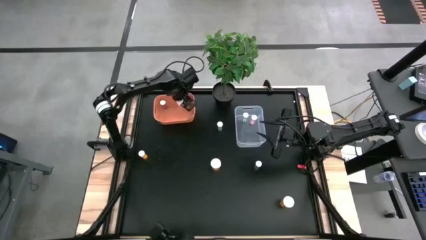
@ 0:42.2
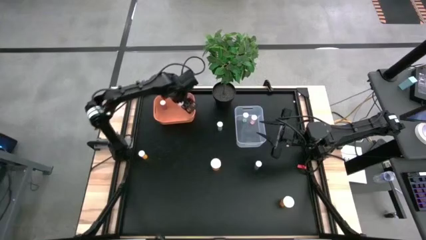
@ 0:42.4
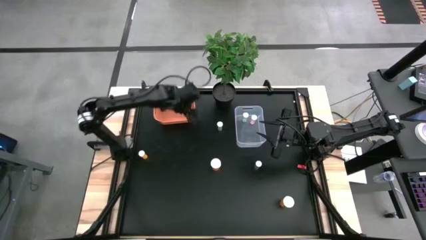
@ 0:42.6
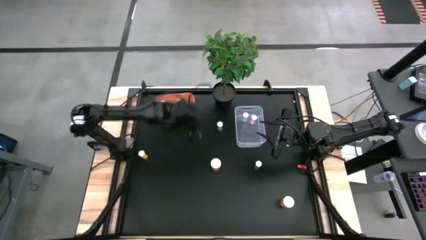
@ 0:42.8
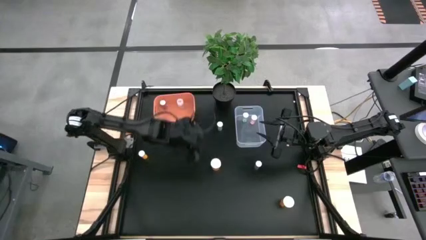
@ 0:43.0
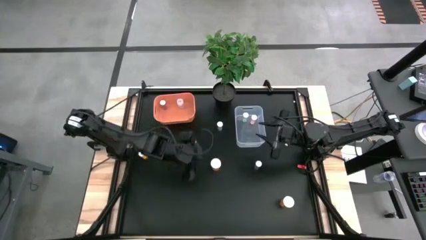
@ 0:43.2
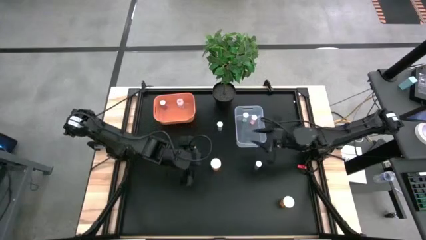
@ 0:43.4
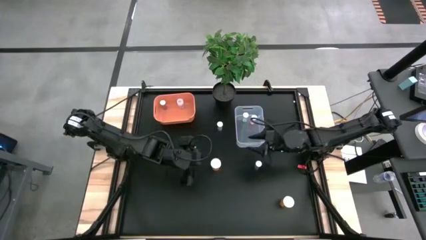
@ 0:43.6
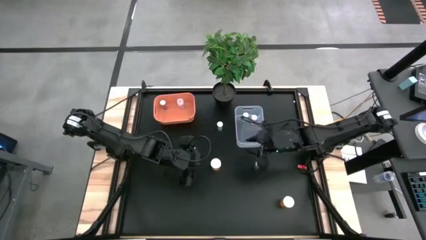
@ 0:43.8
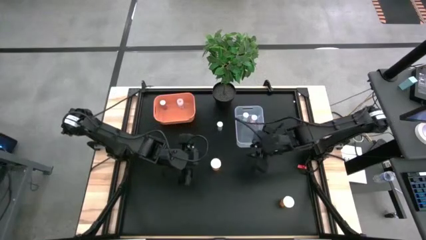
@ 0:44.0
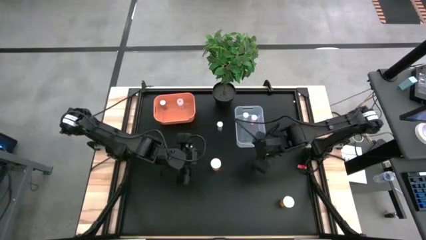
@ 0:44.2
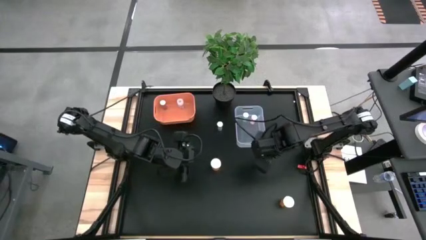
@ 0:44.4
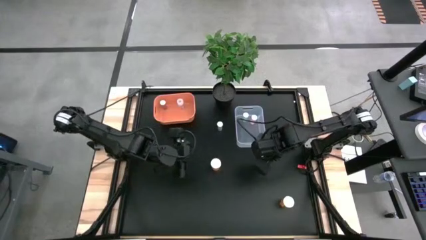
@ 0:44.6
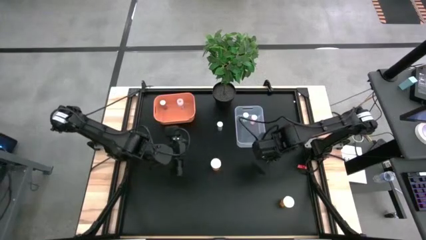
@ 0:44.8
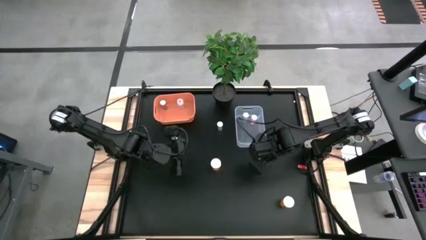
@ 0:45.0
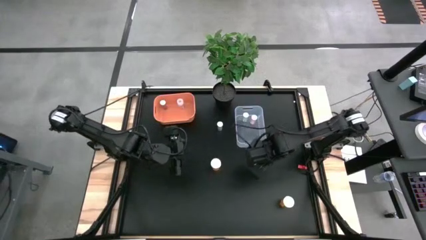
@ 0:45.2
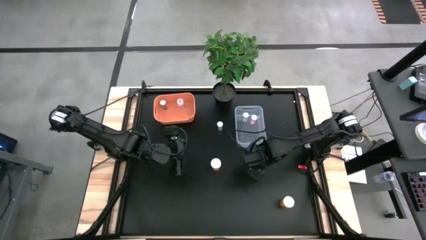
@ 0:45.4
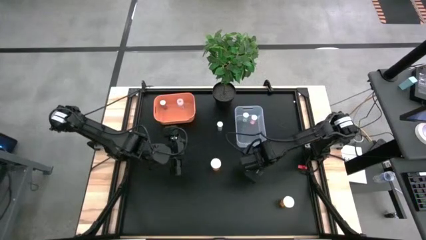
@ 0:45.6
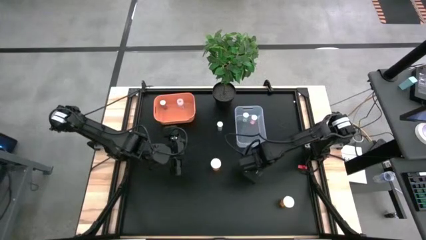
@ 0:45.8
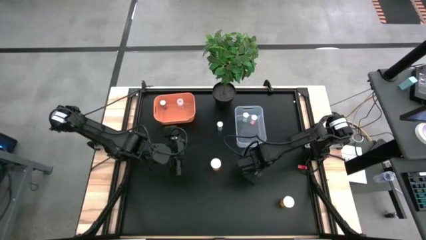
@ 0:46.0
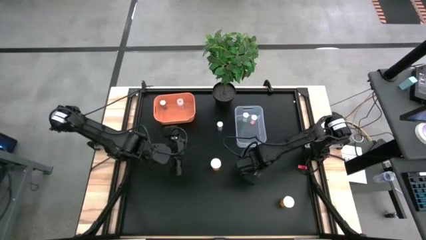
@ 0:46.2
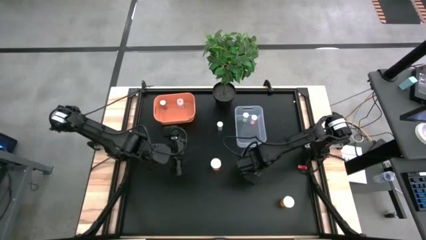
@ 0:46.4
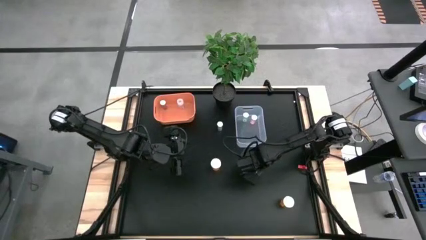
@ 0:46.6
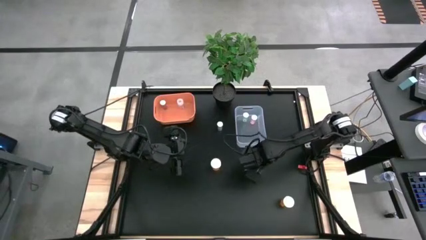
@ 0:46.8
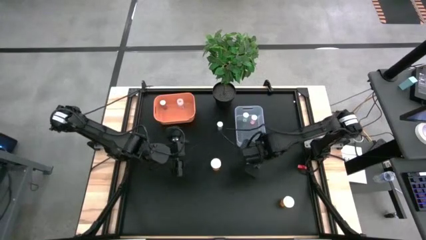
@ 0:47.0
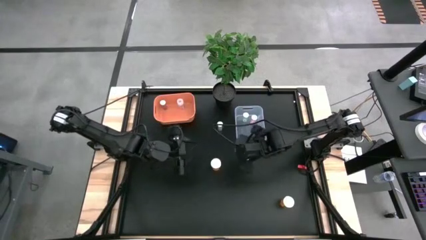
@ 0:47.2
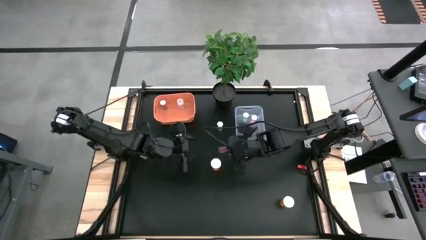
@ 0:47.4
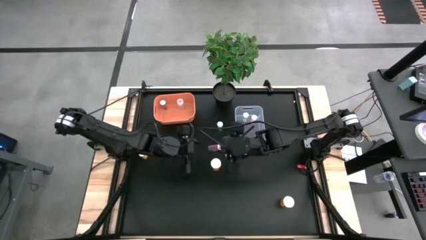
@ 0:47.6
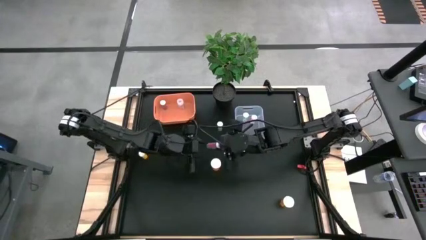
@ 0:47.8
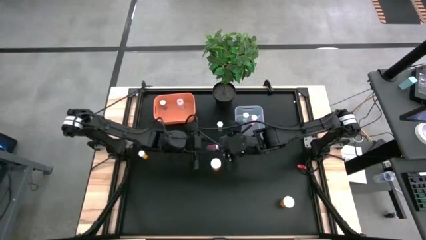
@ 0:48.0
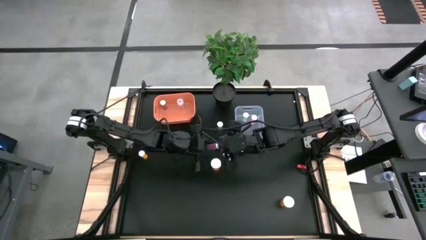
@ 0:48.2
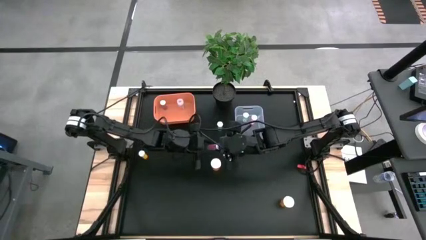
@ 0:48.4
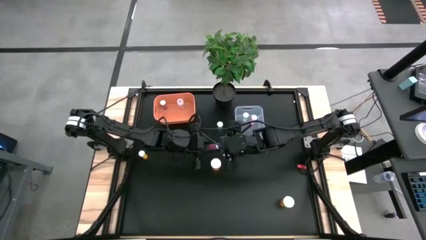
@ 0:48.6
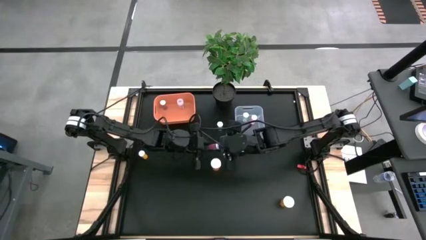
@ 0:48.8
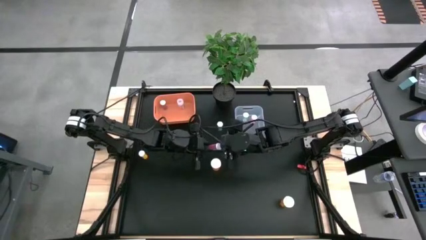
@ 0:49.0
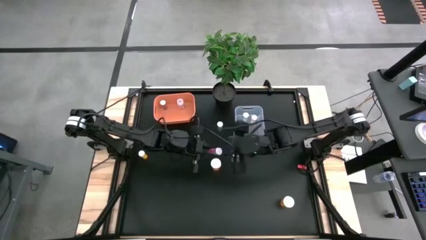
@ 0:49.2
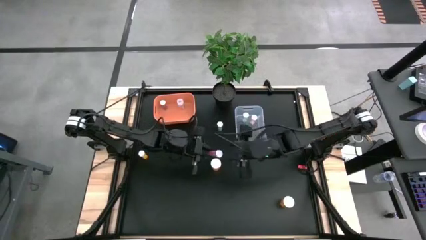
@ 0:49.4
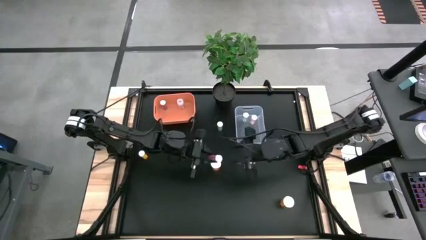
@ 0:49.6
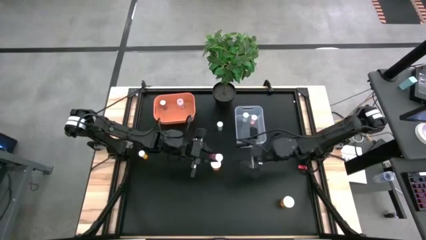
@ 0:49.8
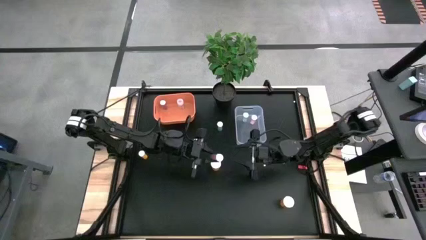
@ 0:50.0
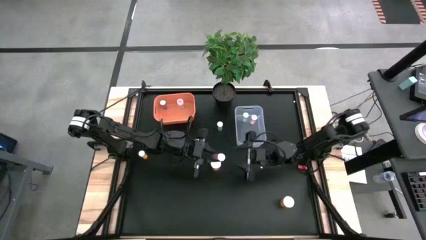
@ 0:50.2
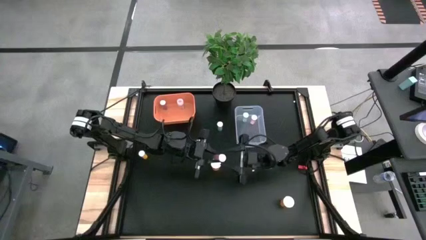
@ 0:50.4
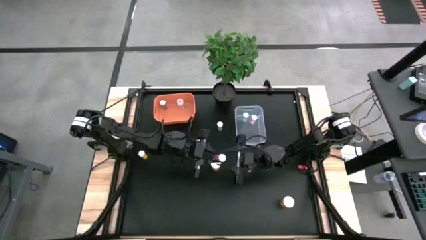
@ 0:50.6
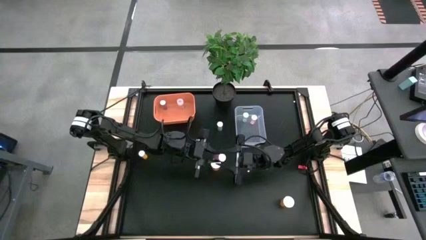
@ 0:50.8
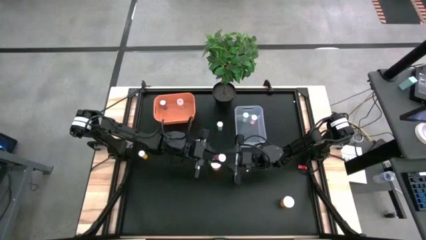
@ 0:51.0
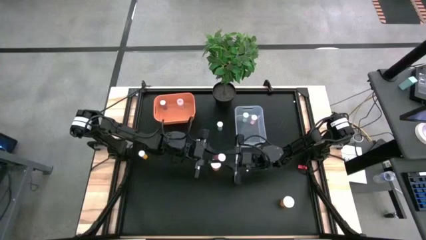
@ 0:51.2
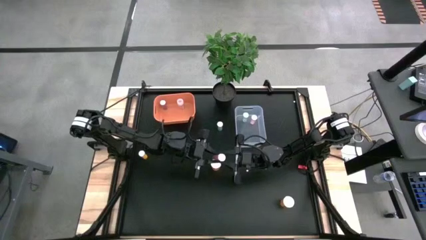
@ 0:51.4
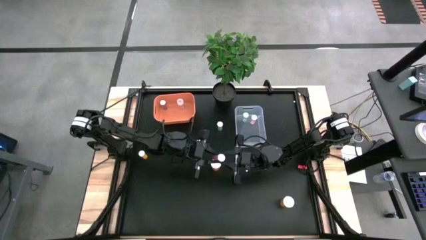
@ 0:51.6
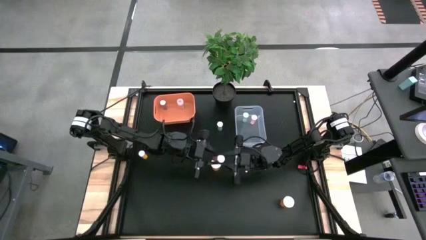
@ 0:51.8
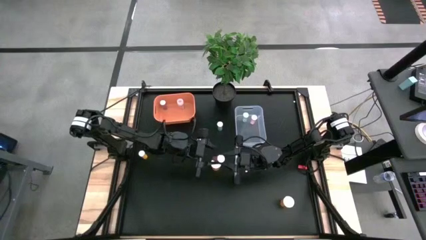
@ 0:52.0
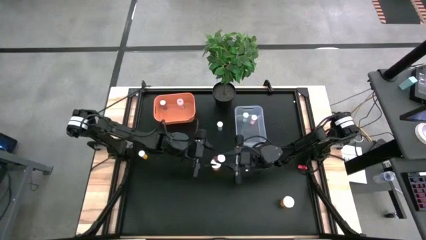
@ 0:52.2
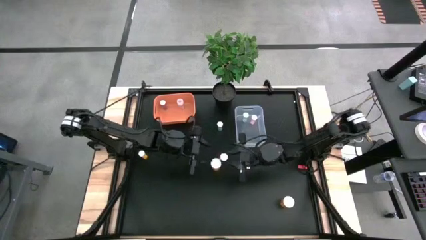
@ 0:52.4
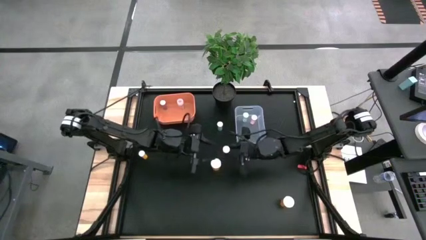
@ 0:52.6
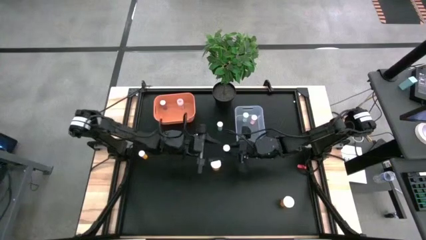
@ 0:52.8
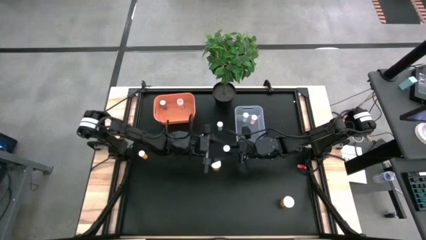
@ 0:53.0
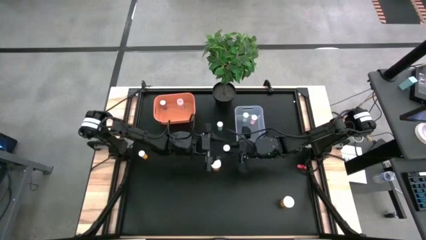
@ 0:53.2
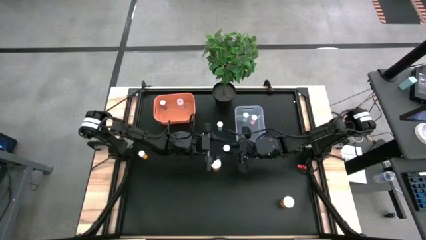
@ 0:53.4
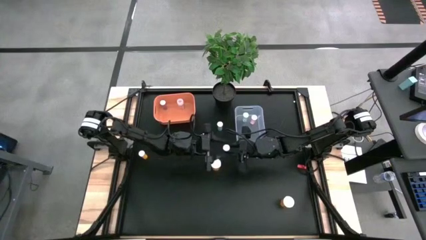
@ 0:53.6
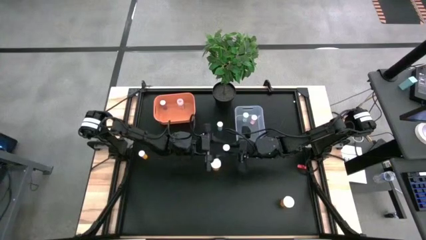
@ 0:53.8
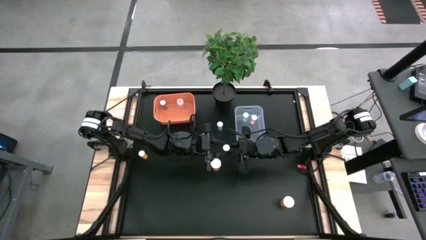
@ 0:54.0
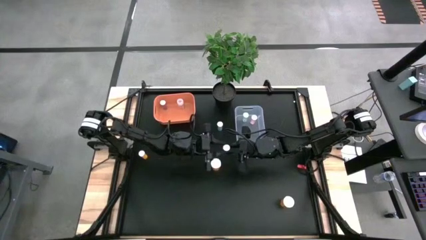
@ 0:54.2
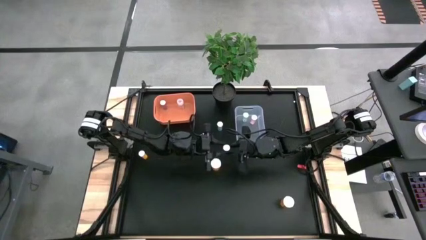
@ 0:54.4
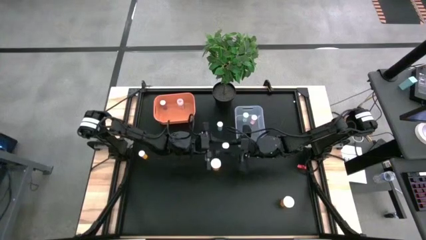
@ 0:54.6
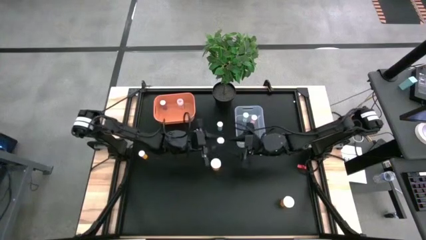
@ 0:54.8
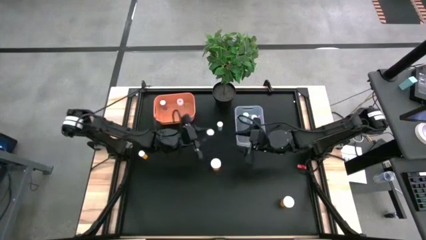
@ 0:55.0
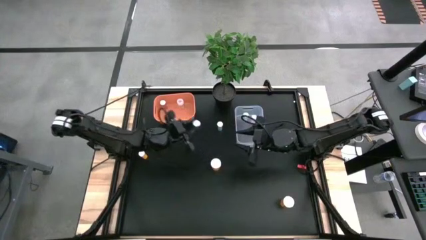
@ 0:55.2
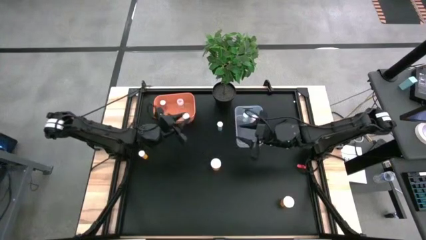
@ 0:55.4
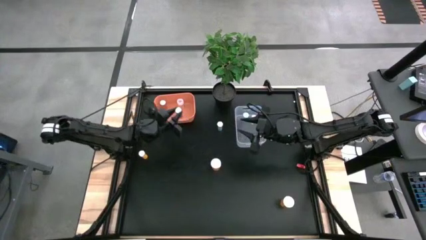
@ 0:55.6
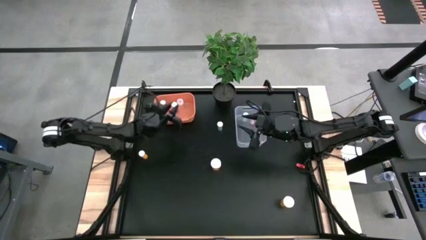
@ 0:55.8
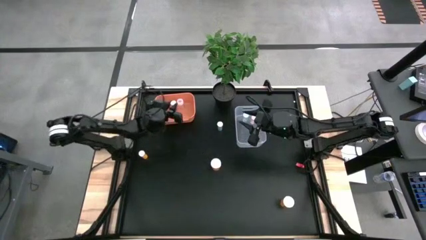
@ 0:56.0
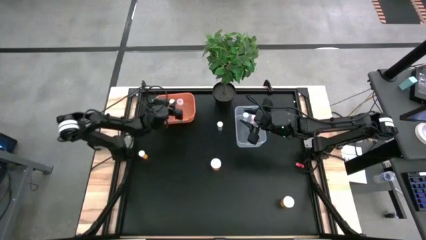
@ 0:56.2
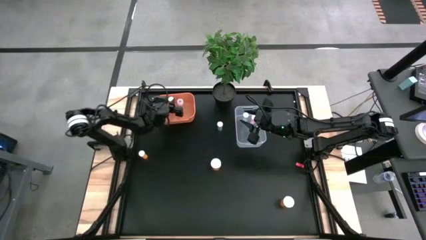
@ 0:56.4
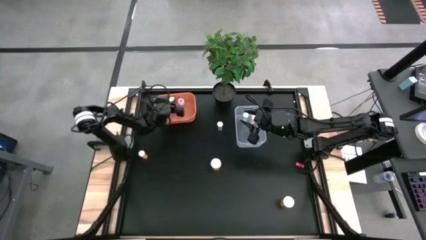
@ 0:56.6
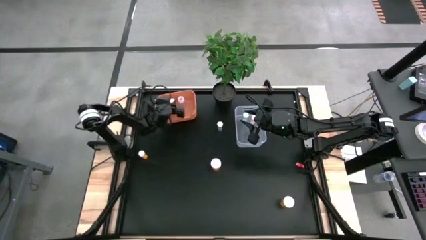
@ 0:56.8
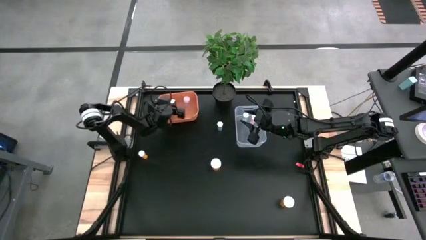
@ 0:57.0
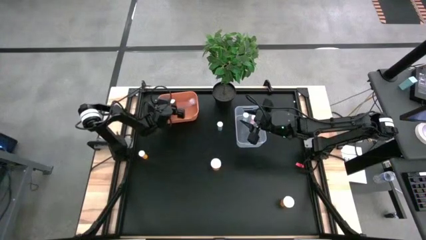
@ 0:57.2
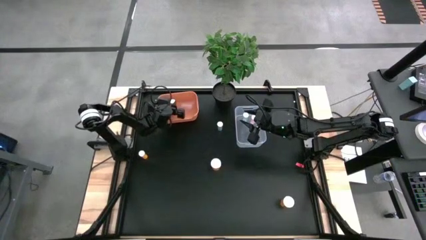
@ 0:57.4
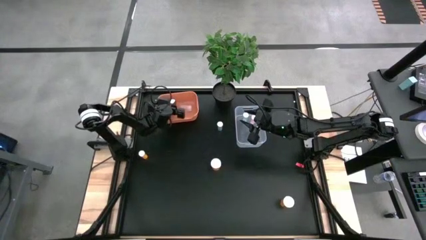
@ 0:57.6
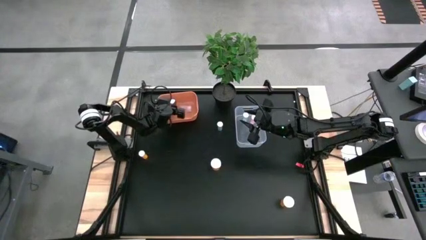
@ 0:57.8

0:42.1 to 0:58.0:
Task: Pick and place medicine bottles into bin by pill shape (circle, oval)
Put the blue tablet pill bottle into the orange bin
